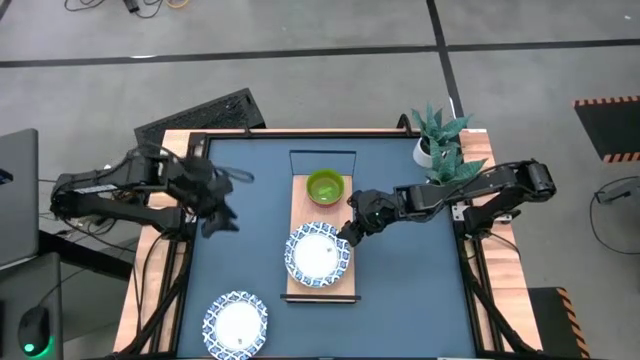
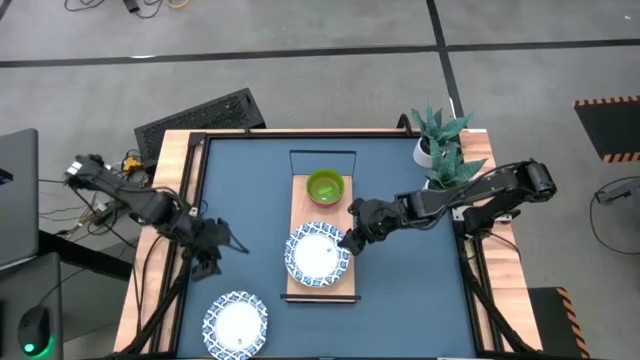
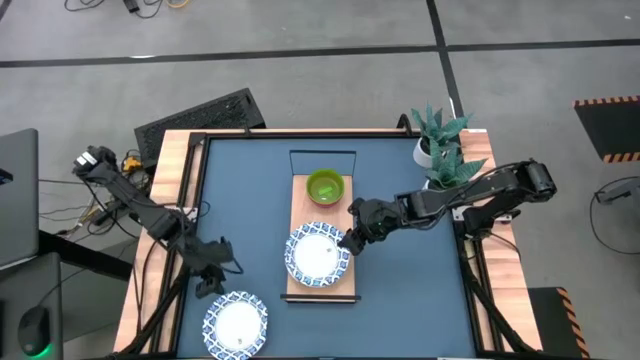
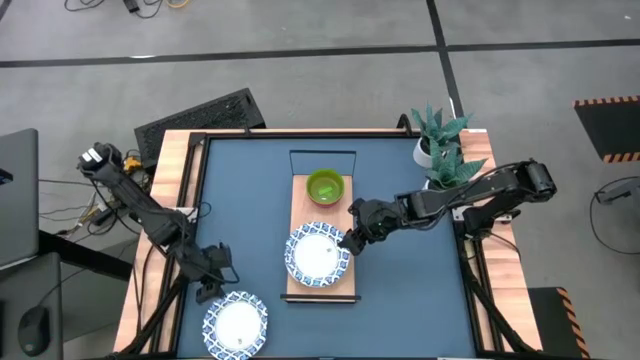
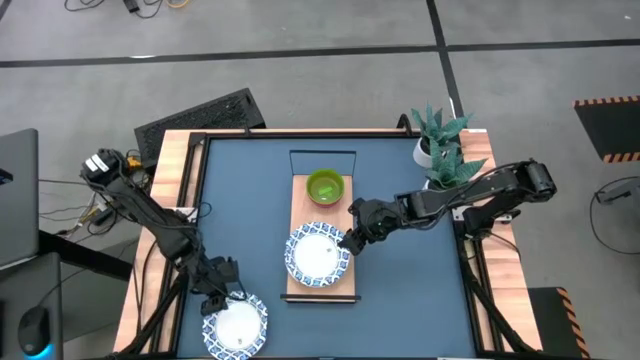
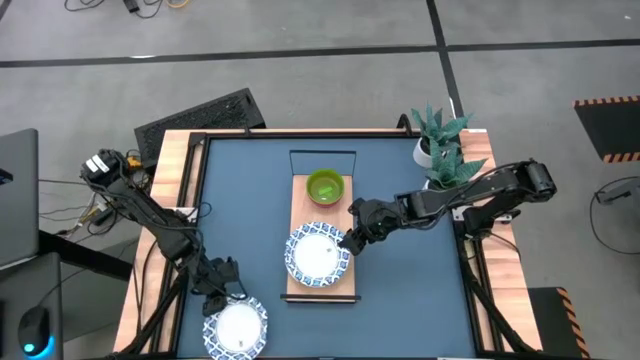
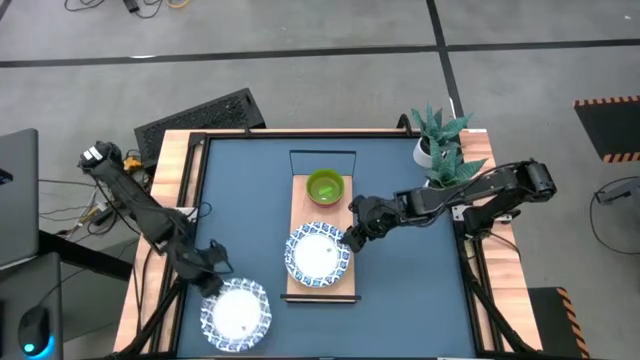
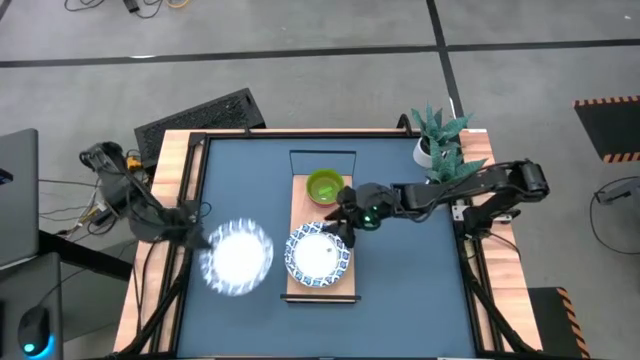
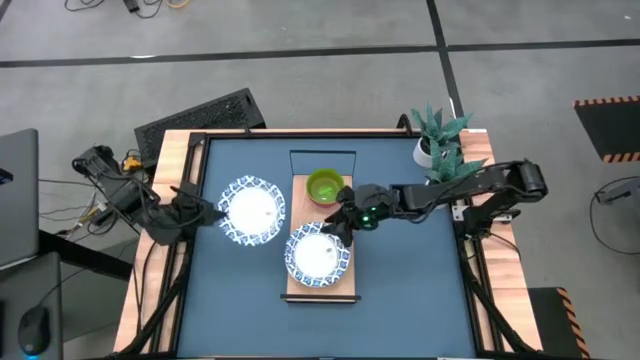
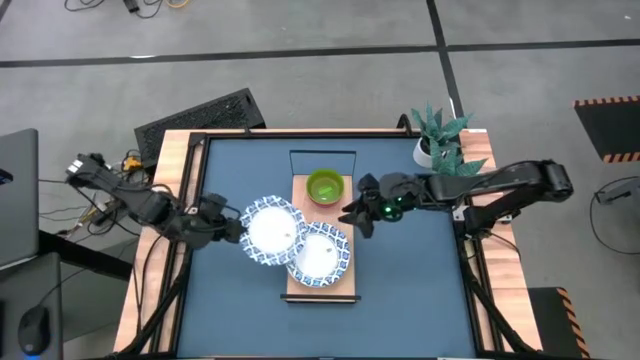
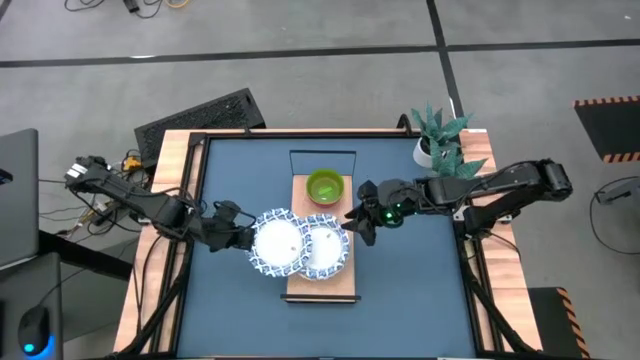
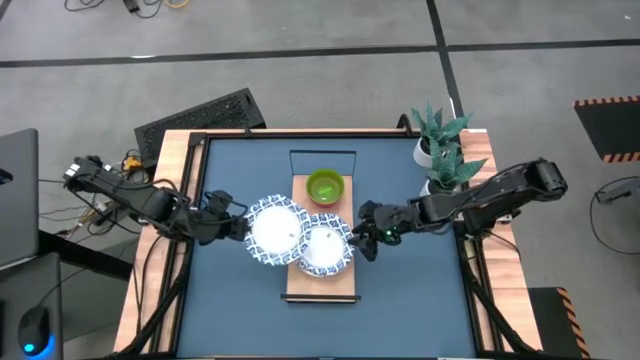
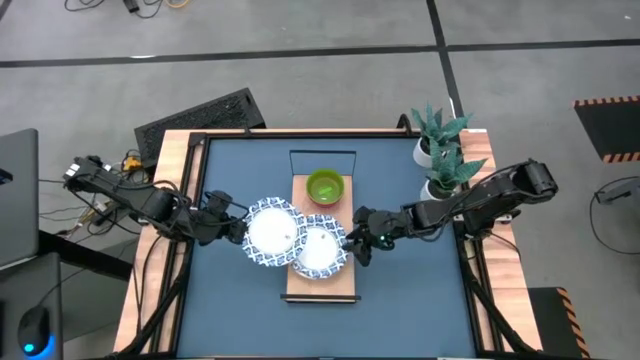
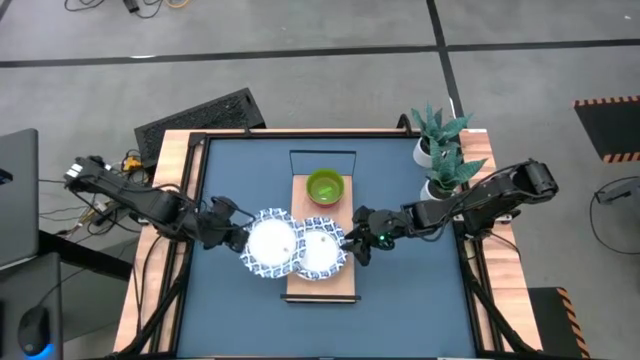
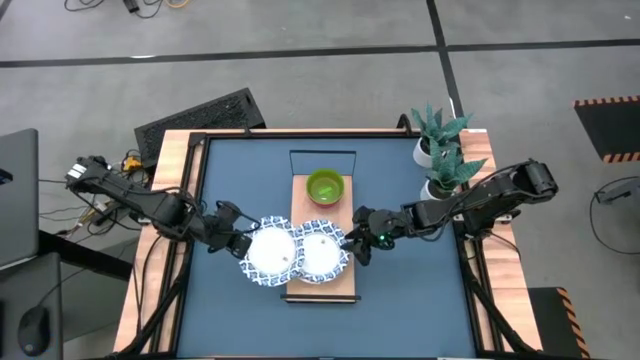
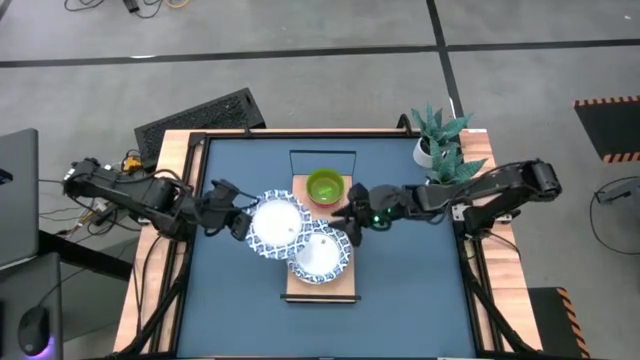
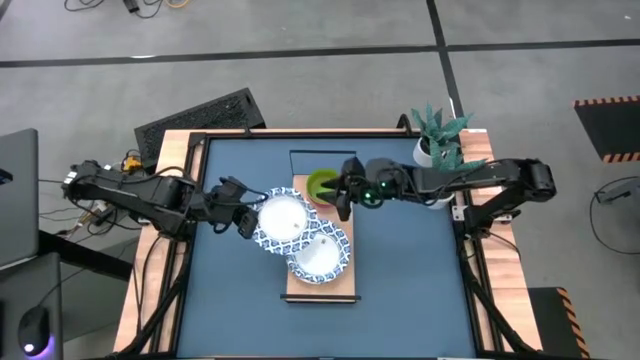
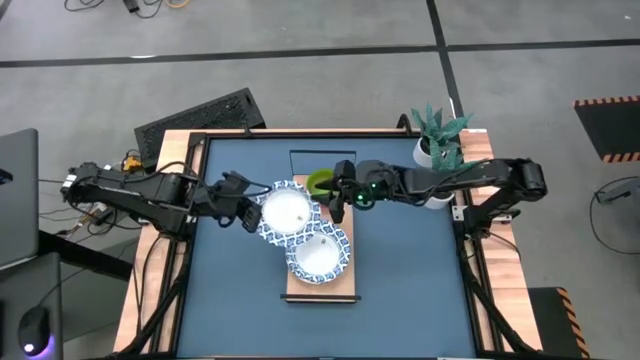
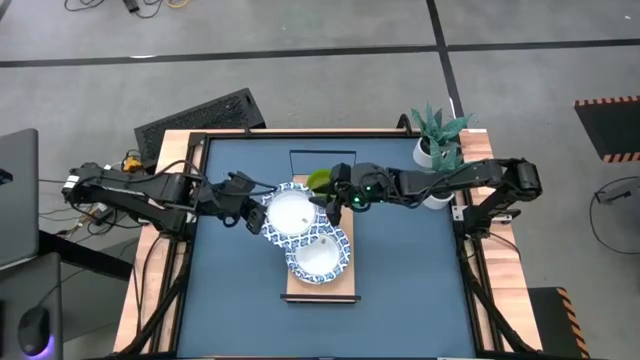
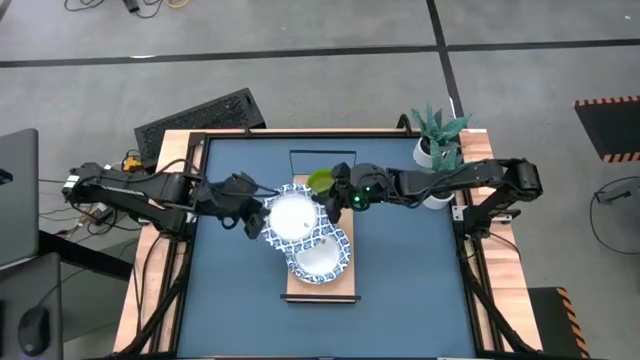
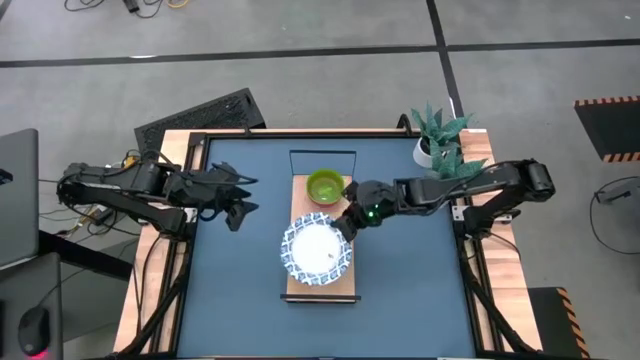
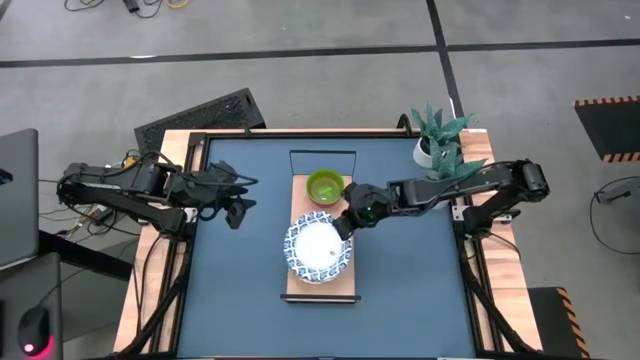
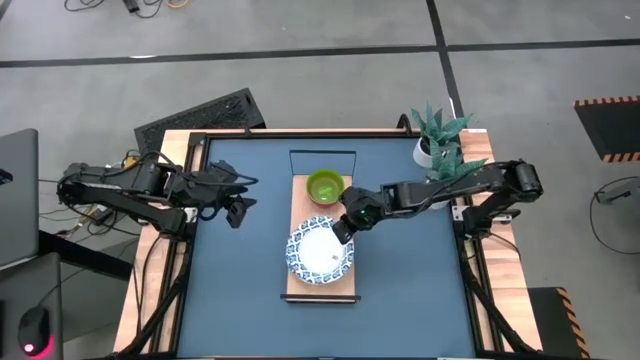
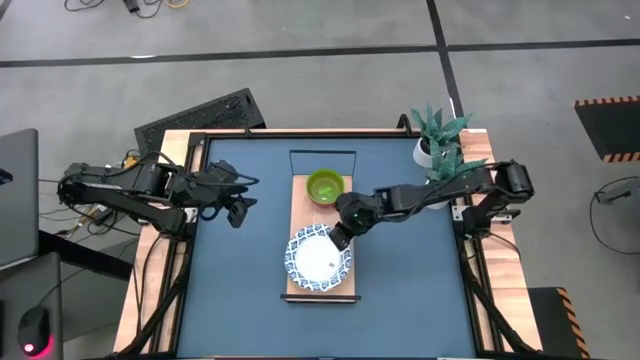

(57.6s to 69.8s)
Task: Place and stack bowls onto a shelf
Stack the white patterned plate on top of the other white patterned plates on the shelf

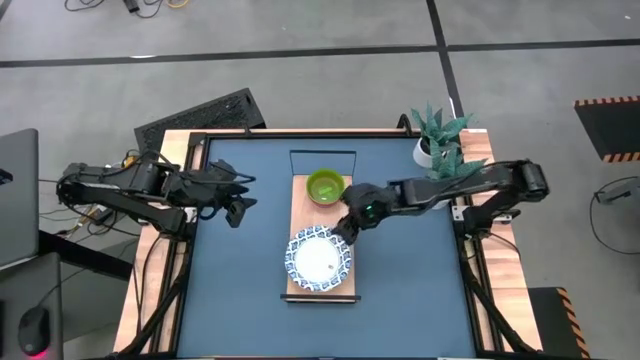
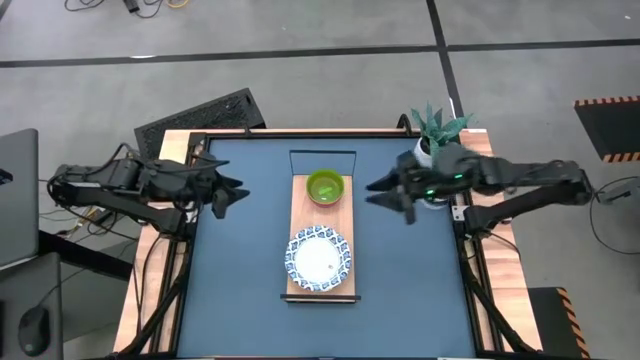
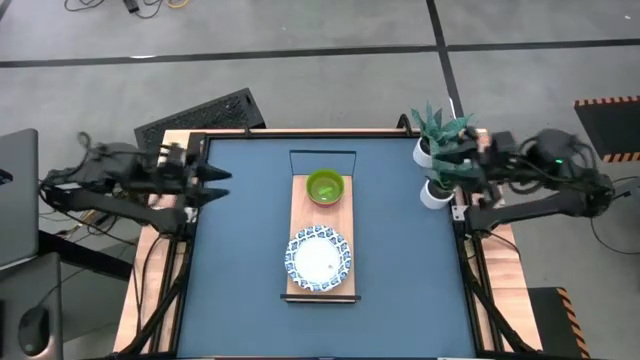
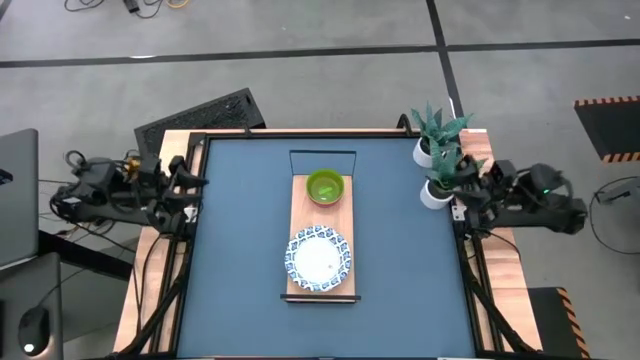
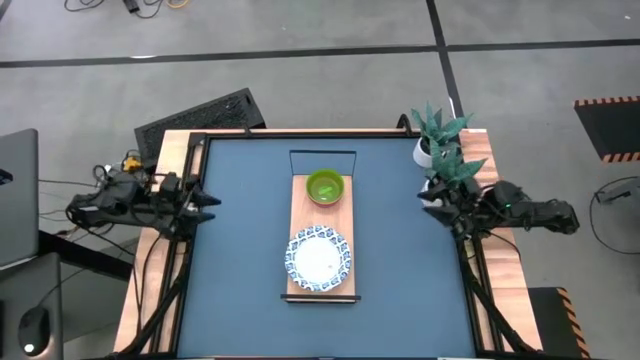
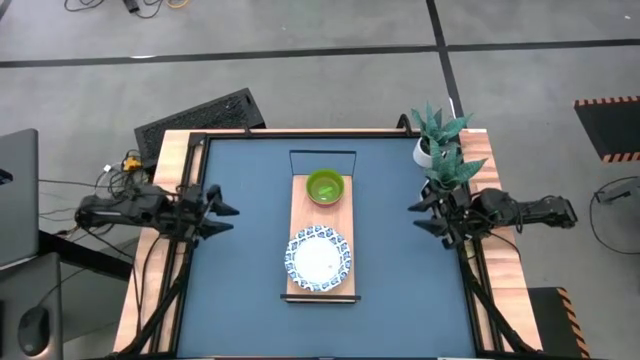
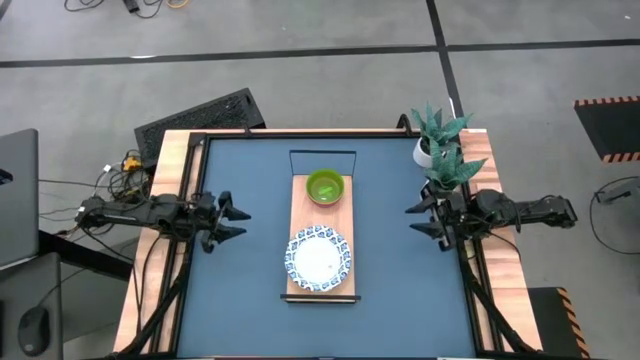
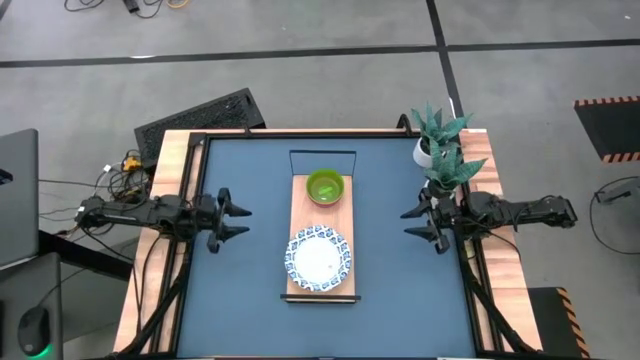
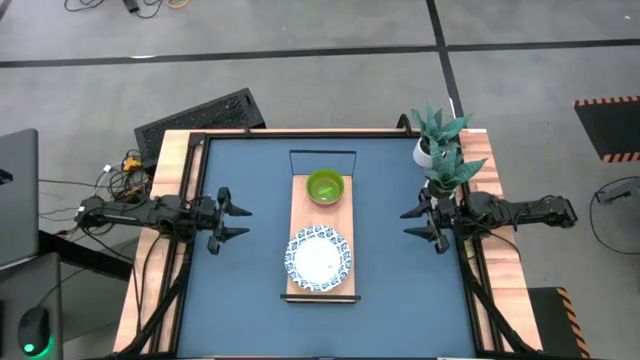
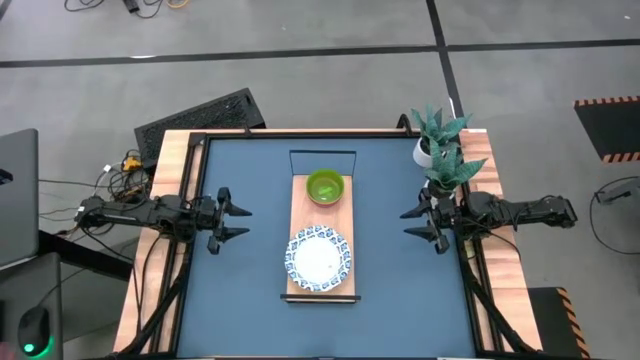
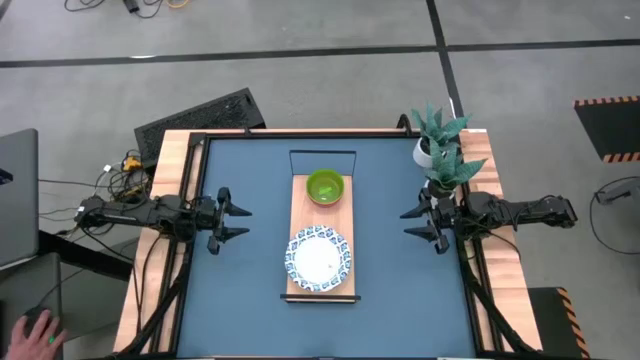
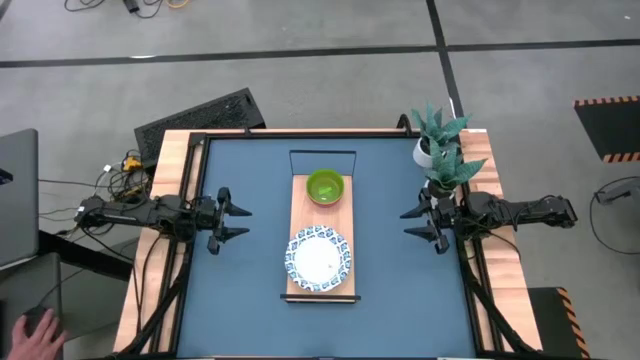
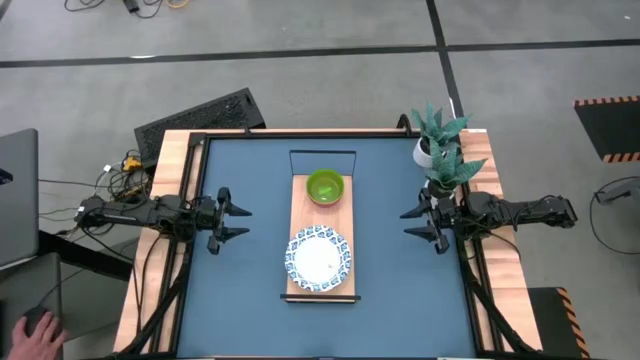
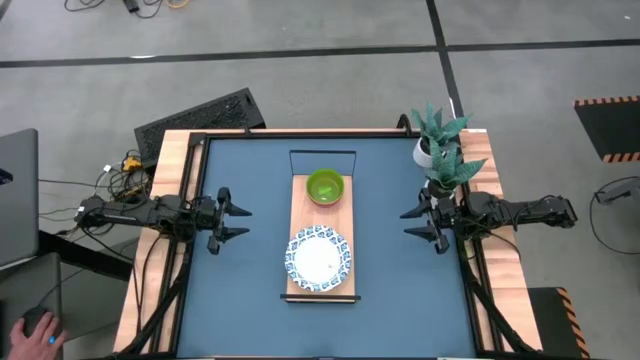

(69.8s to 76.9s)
Return to Home Position

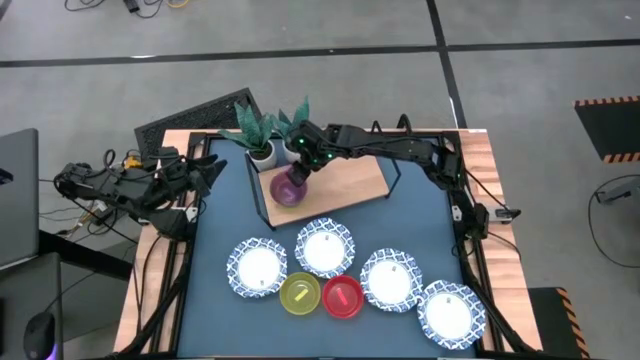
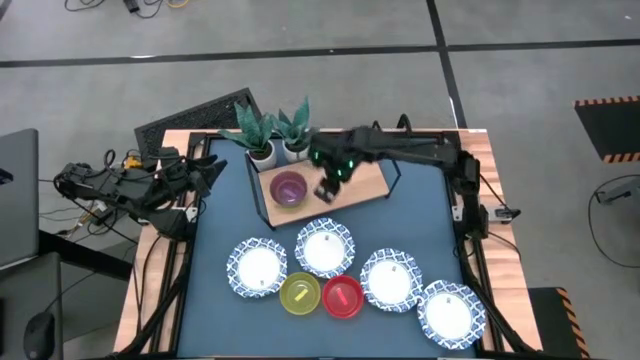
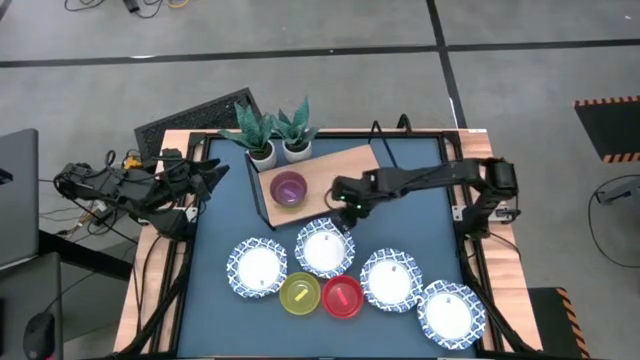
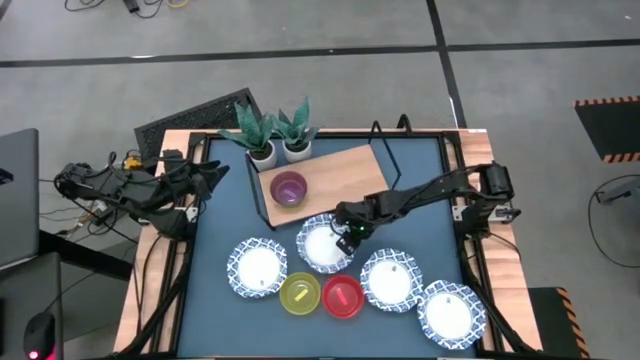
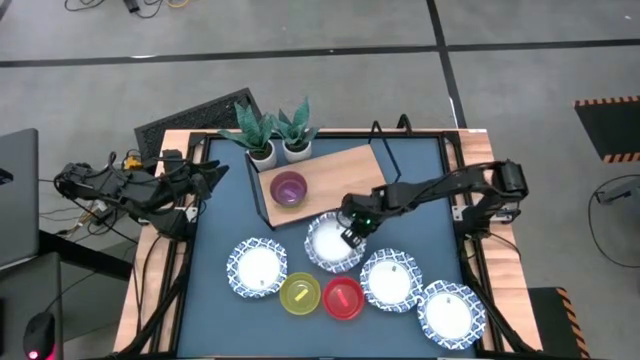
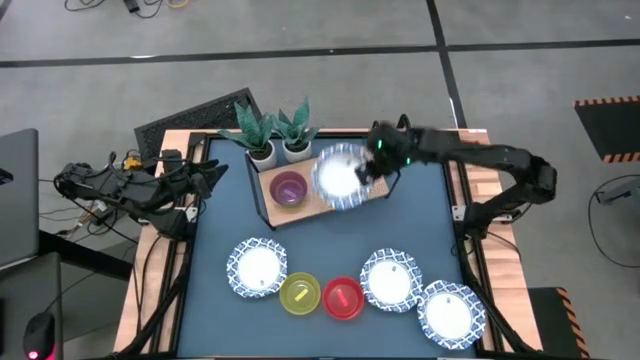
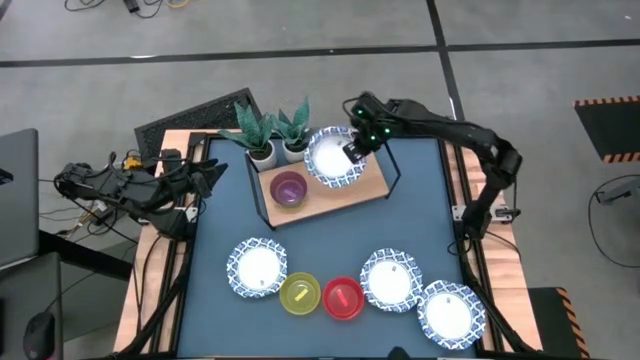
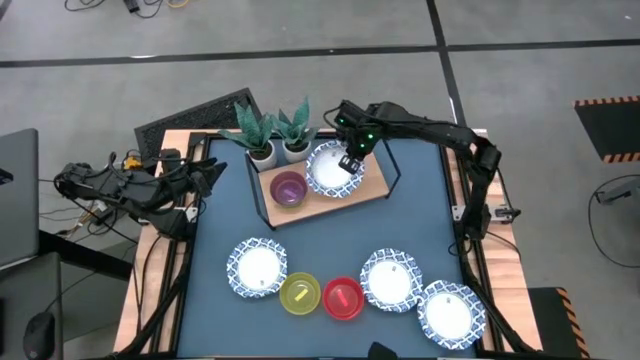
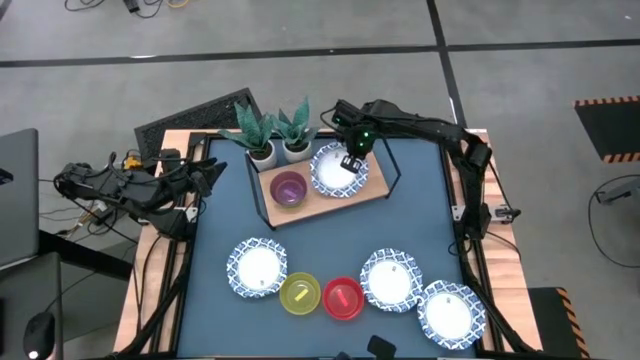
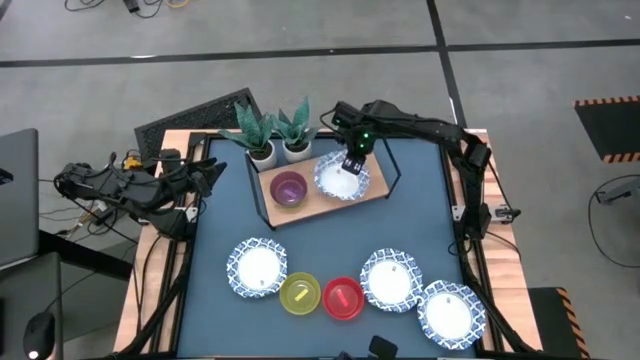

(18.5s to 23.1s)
Task: Place and stack bowls onto a shelf
Put the white pattern bowl on the shelf
